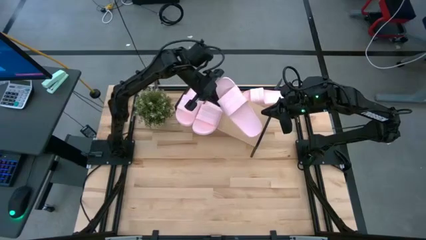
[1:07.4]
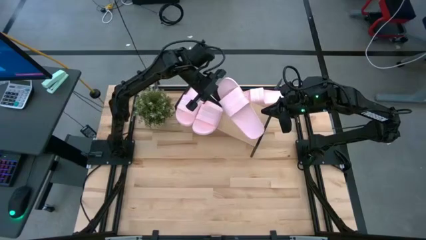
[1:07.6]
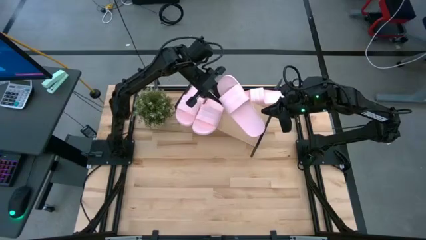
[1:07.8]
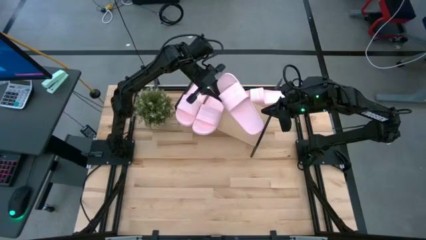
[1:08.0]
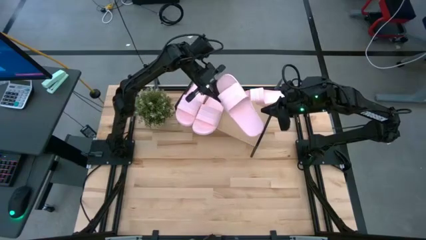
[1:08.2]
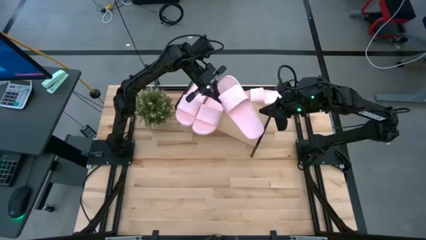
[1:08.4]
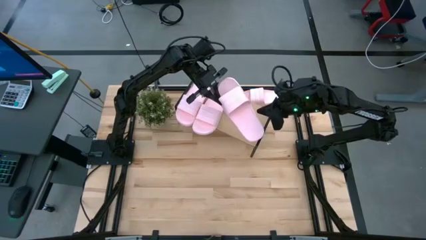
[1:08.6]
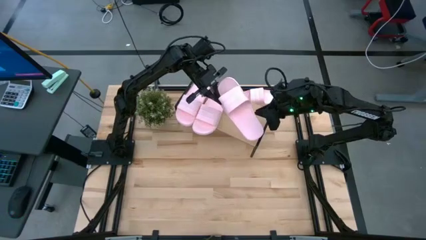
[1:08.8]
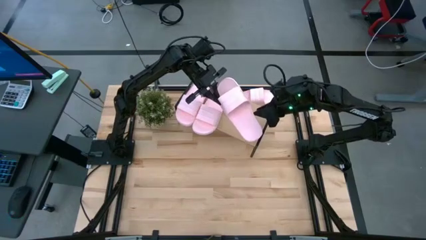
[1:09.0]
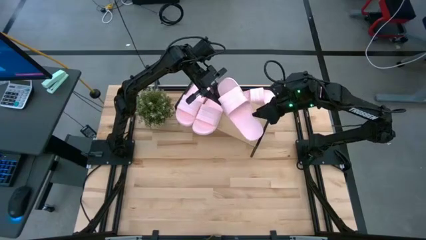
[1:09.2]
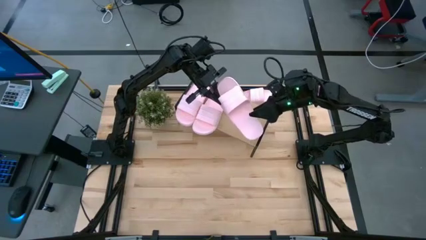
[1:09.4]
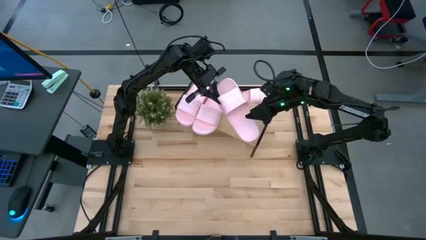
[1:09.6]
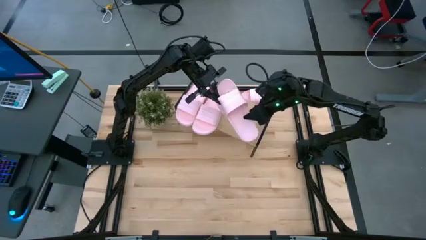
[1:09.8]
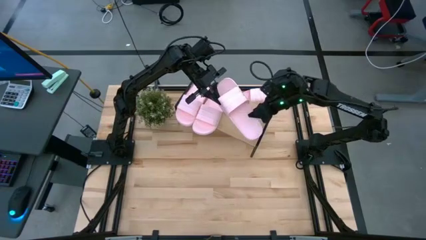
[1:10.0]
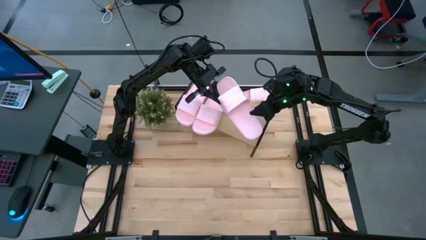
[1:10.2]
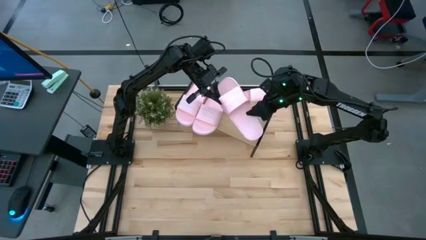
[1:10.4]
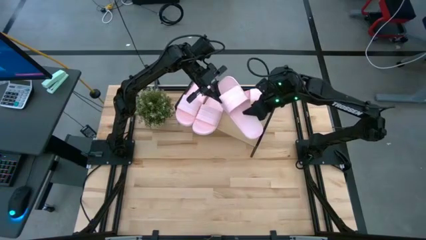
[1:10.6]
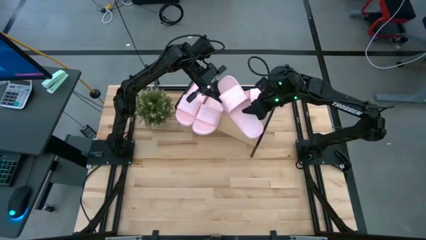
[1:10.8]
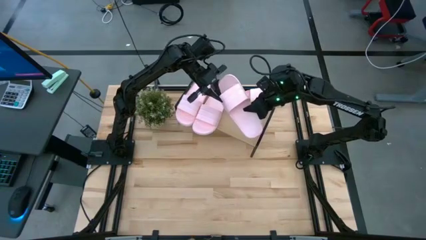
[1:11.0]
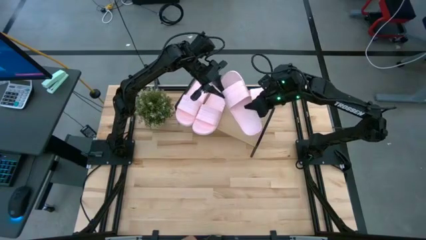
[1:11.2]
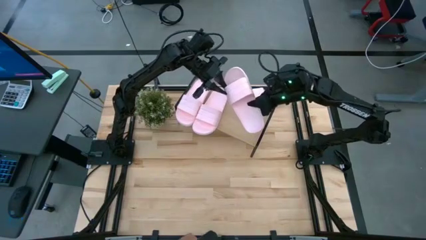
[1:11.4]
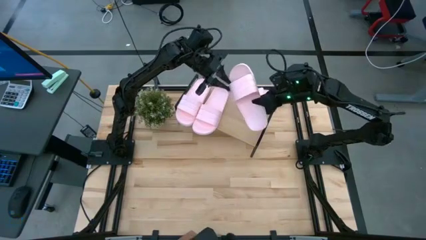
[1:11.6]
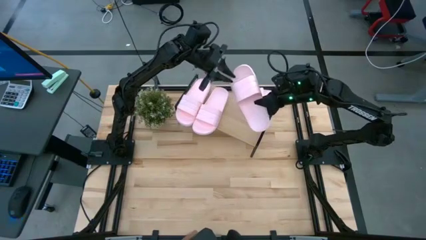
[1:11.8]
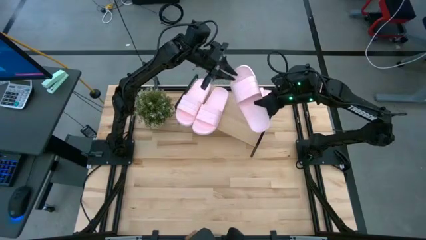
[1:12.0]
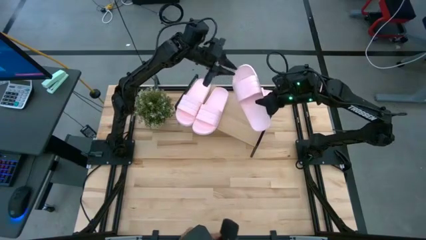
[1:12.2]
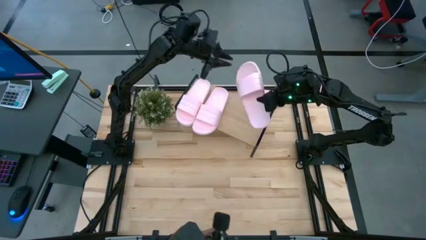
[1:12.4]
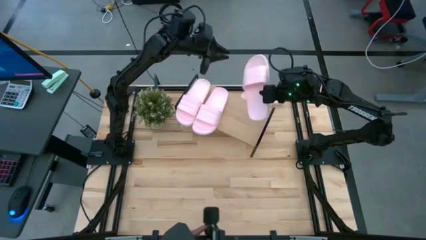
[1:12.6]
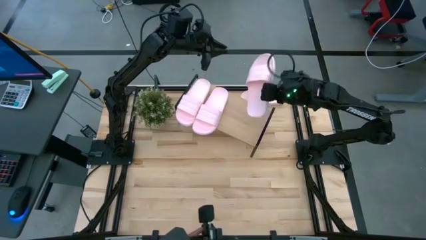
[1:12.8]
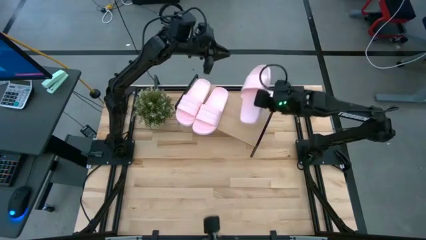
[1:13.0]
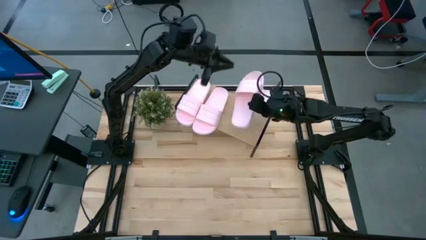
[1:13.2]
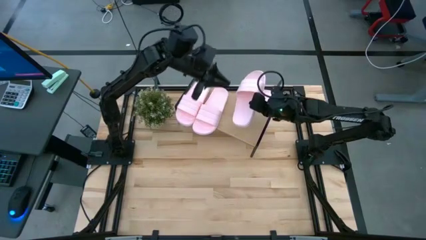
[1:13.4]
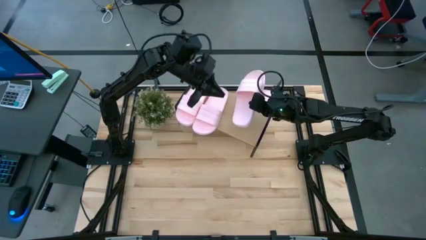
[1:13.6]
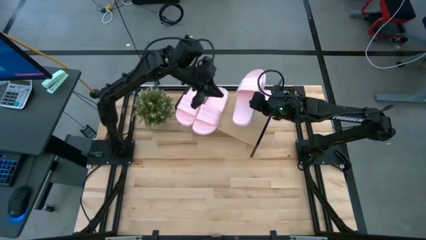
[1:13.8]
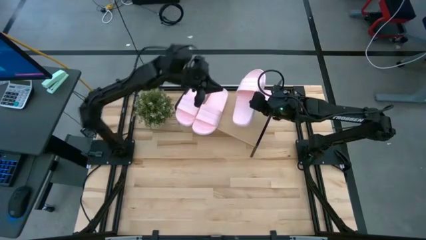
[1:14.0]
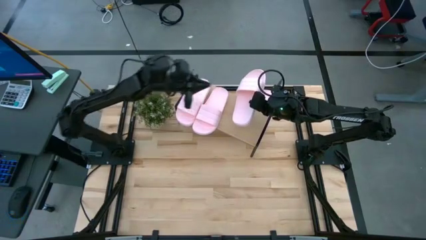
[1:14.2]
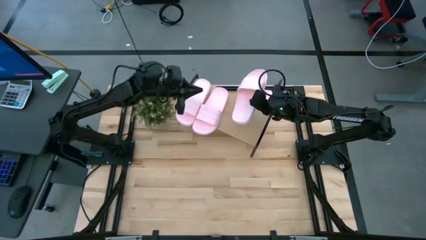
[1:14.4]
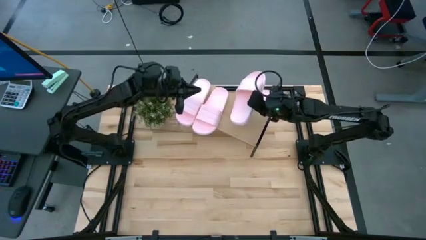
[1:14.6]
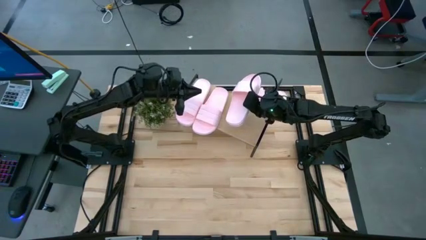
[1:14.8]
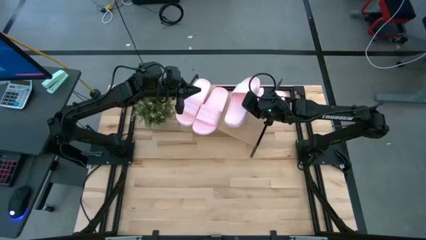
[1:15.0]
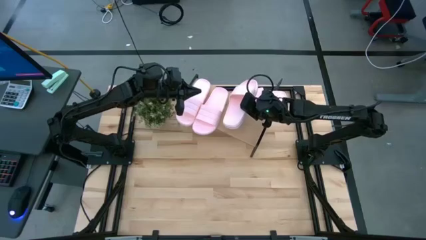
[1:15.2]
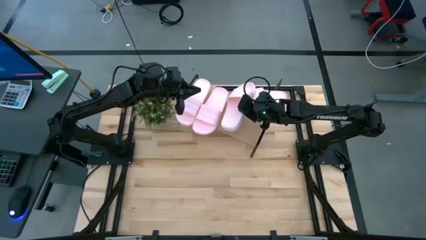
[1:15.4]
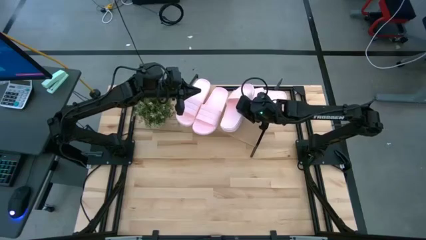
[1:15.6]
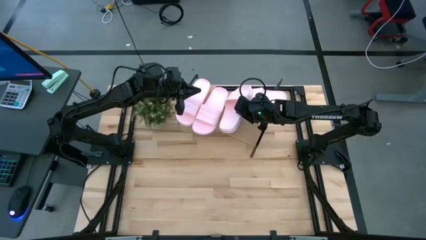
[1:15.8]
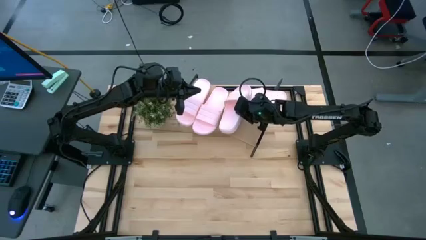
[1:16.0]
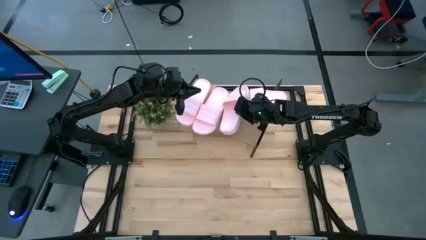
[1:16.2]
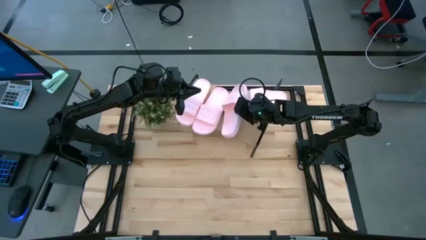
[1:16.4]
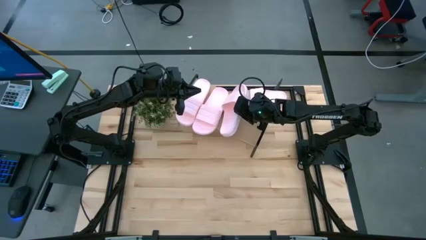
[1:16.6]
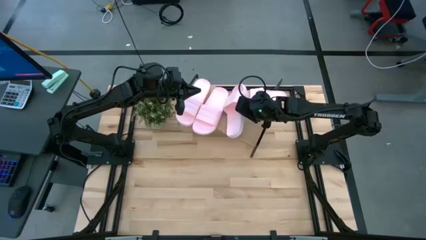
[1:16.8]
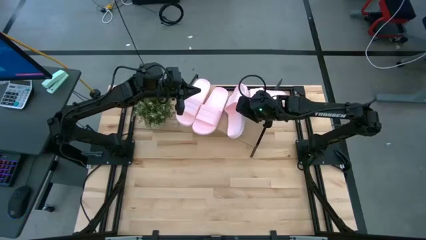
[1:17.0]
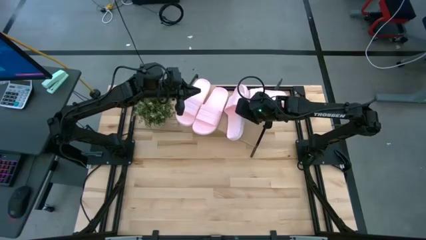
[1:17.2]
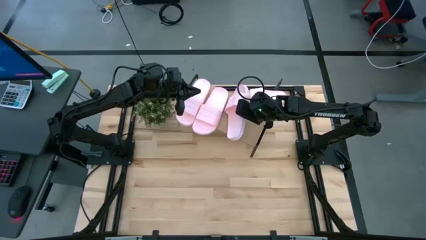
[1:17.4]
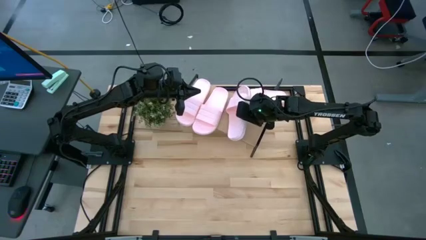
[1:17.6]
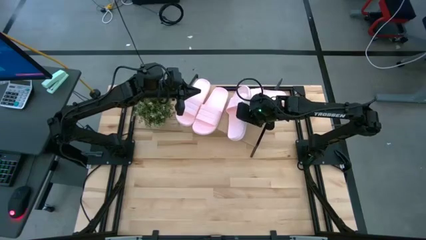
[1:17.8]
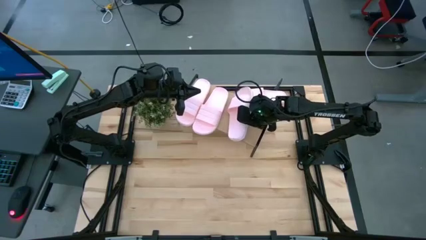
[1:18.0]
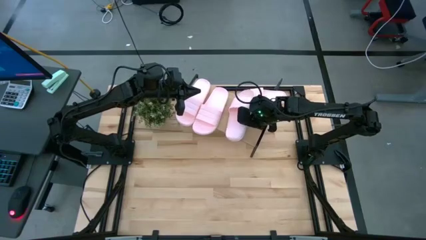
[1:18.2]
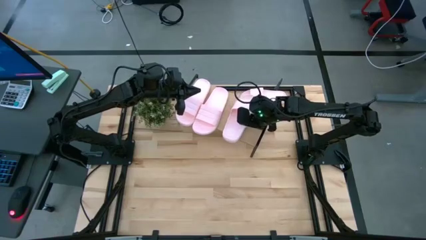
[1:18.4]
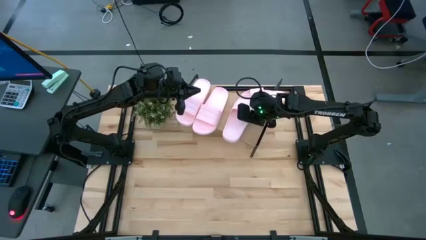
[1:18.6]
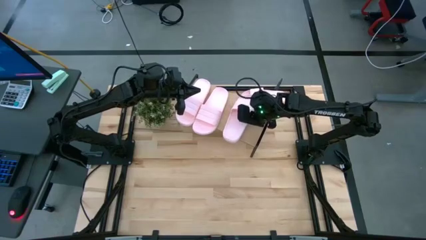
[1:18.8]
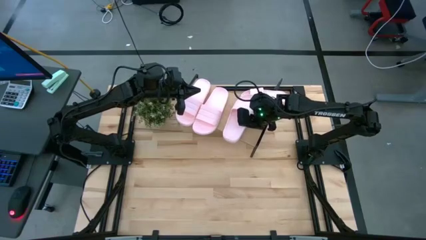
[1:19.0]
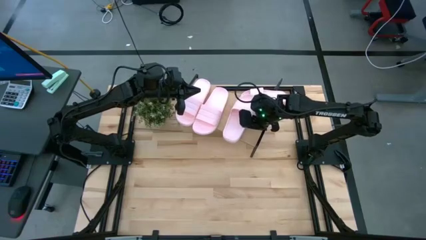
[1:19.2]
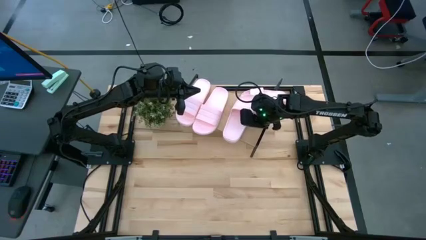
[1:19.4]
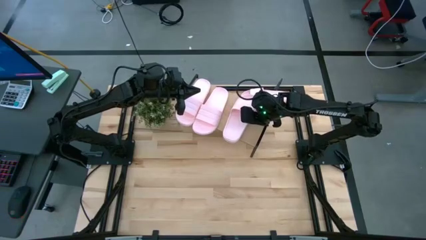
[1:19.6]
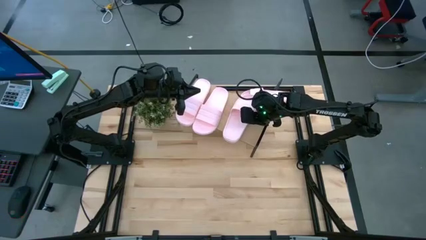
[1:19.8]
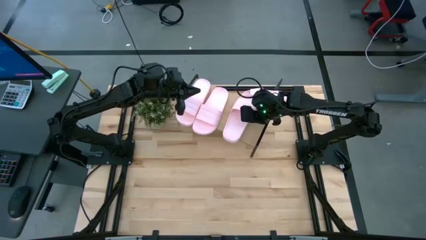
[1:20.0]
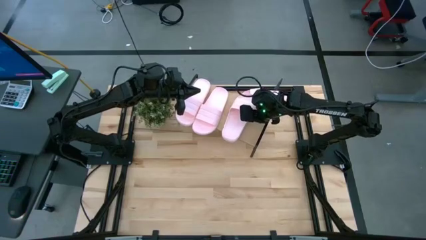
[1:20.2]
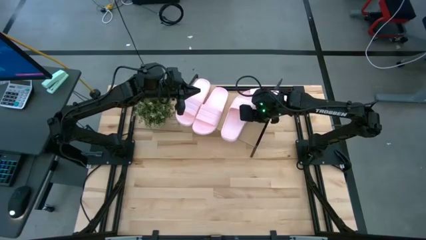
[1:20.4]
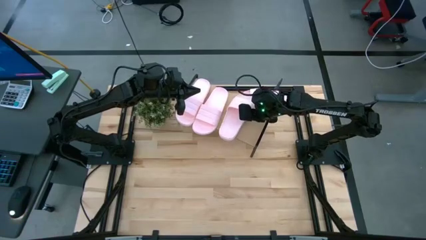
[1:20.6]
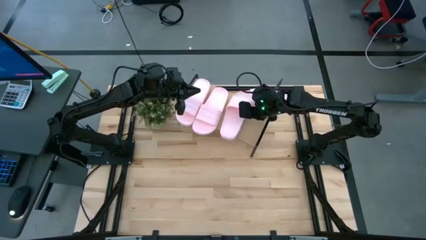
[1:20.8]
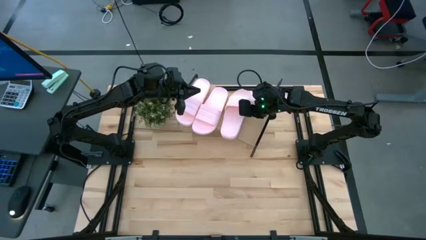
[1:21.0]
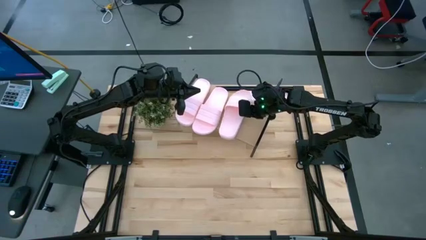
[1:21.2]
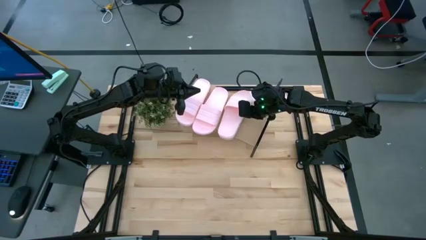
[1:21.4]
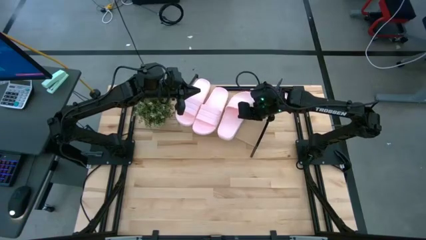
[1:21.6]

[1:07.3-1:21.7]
Task: Pick and place slides into the shelf
Put the pink slide on the shelf
